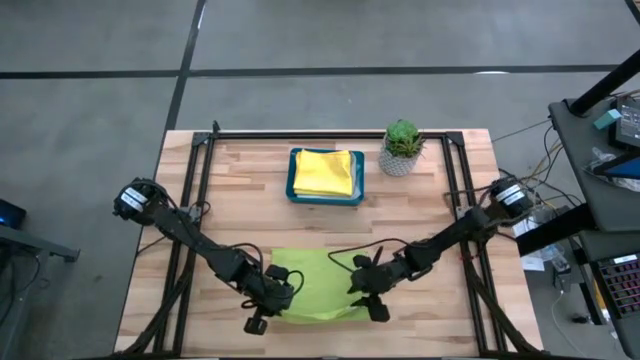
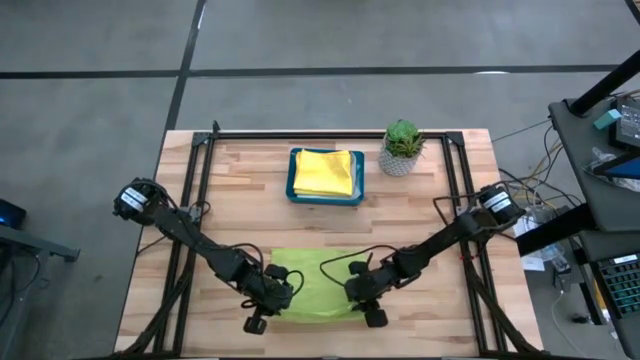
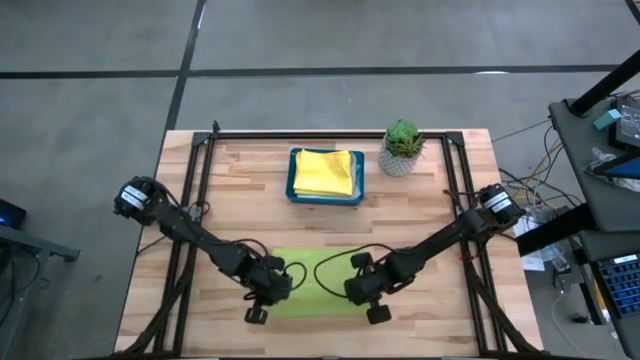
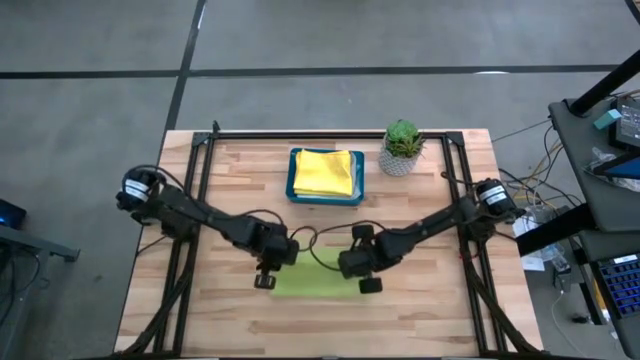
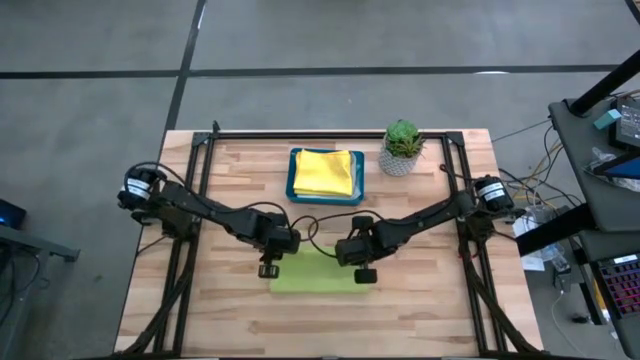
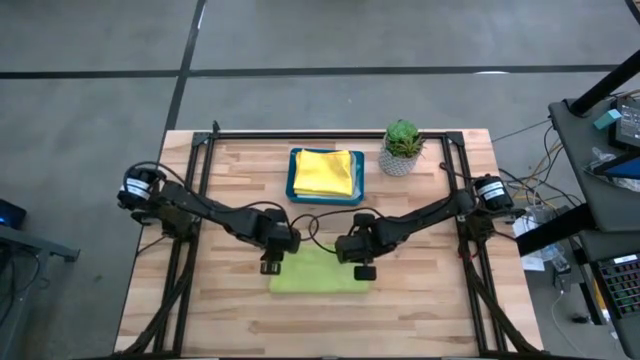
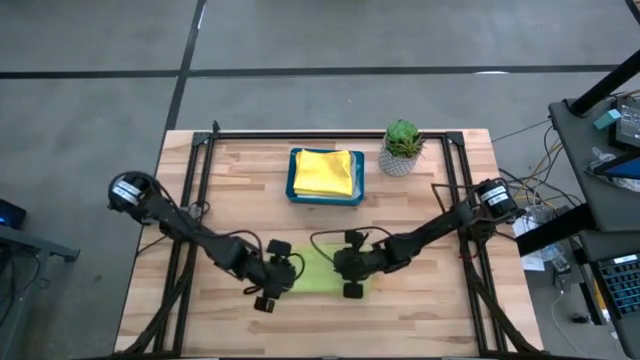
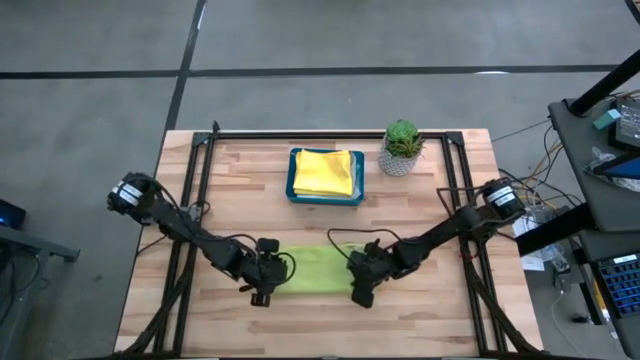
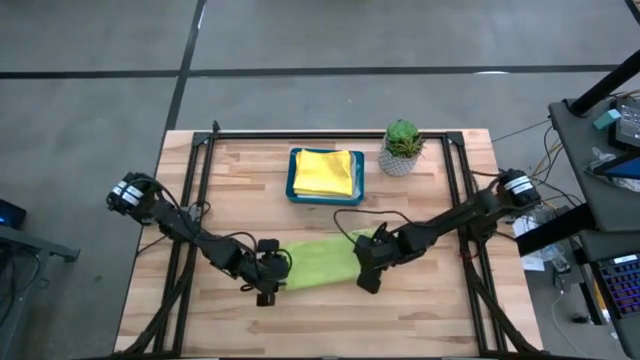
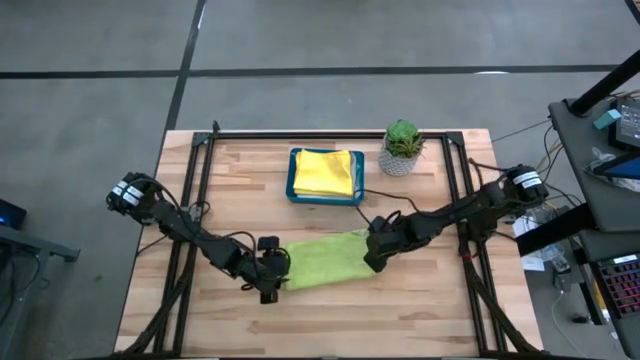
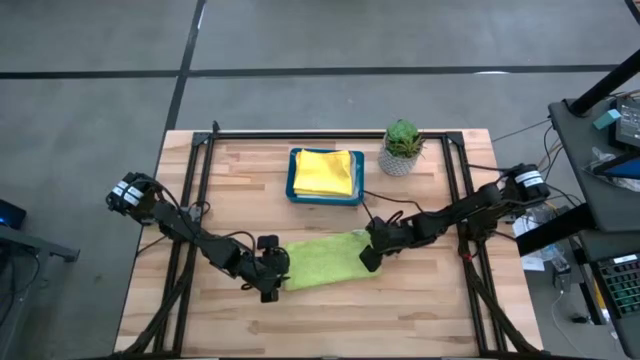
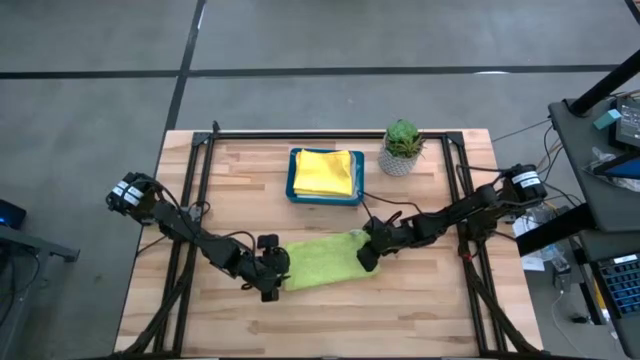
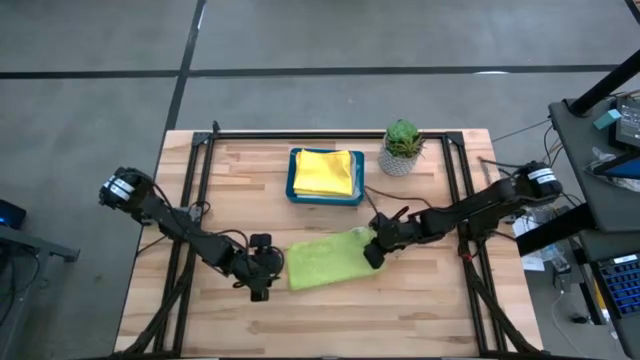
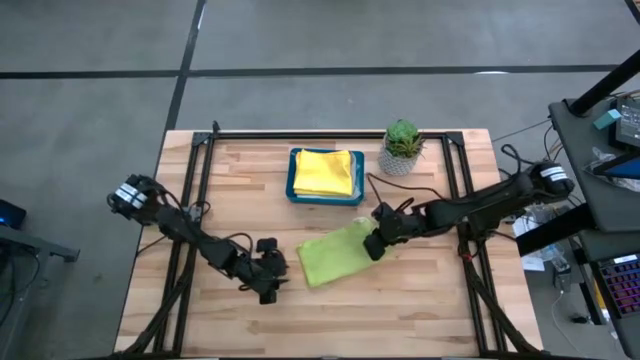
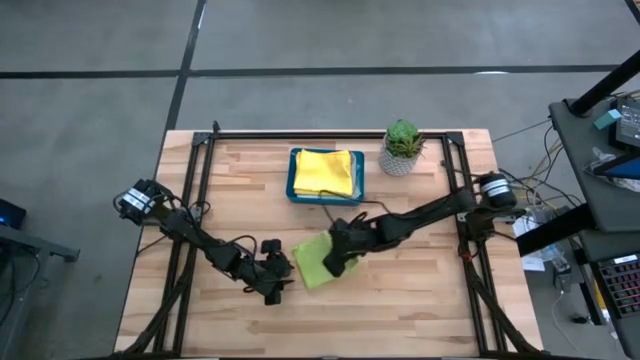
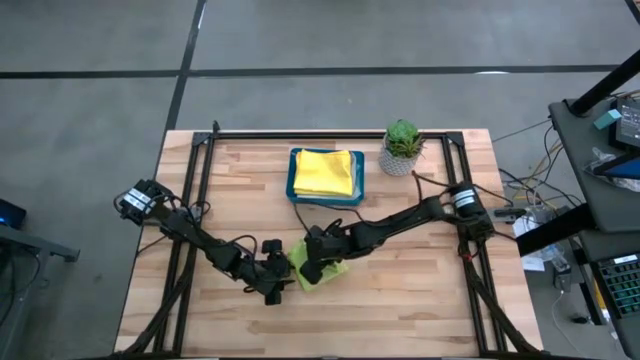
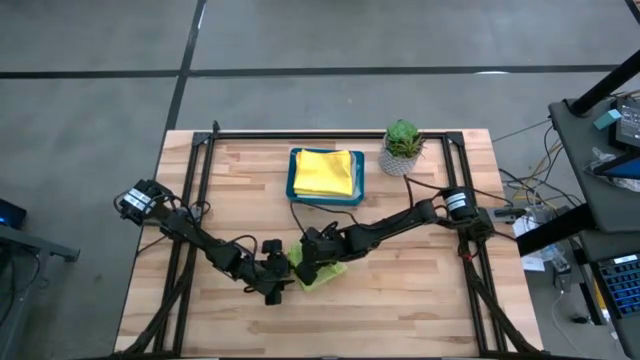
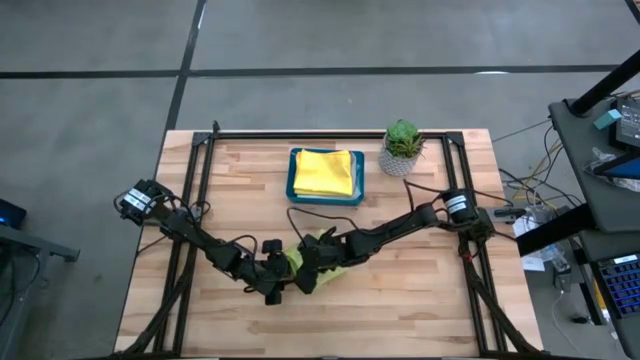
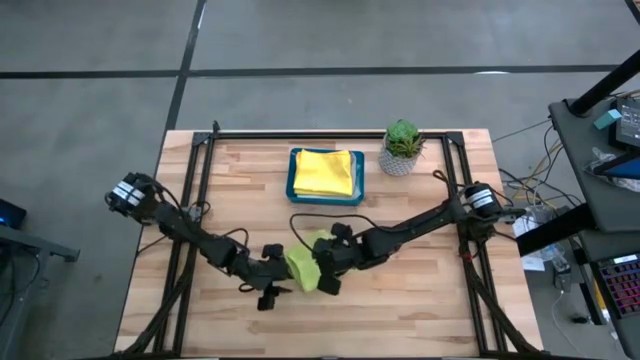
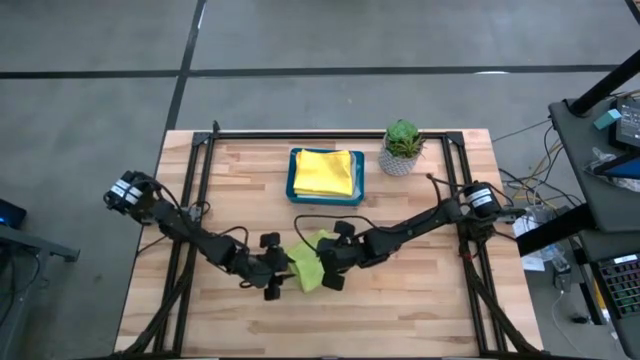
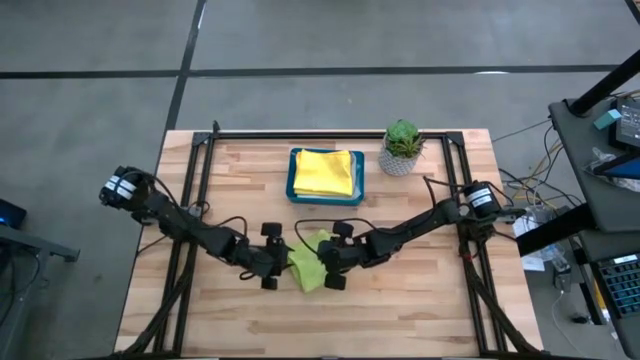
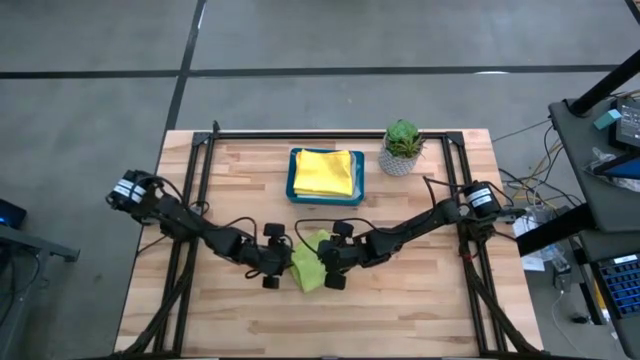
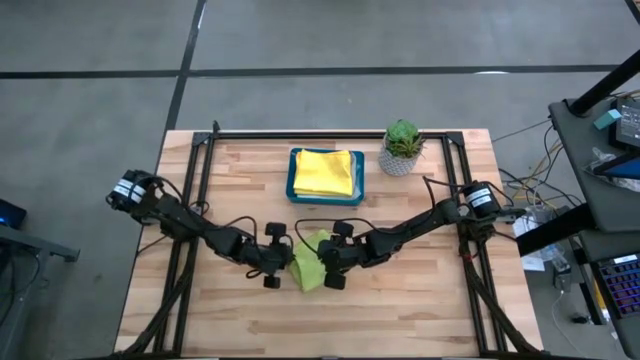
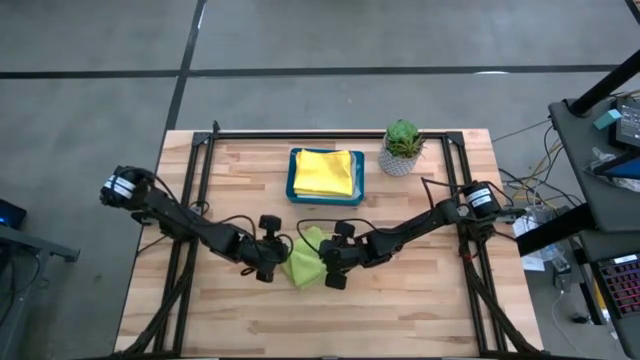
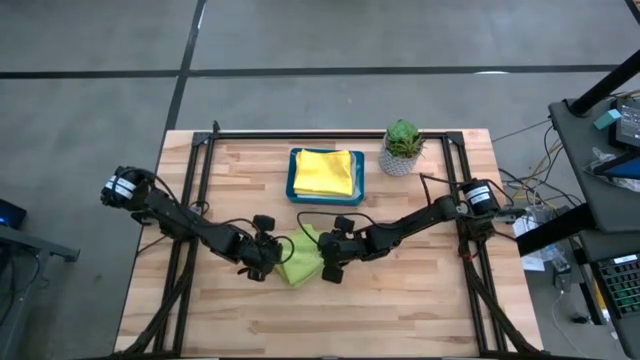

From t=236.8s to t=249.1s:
Task: Fold microfiber towels
Fold the green microfiber cloth

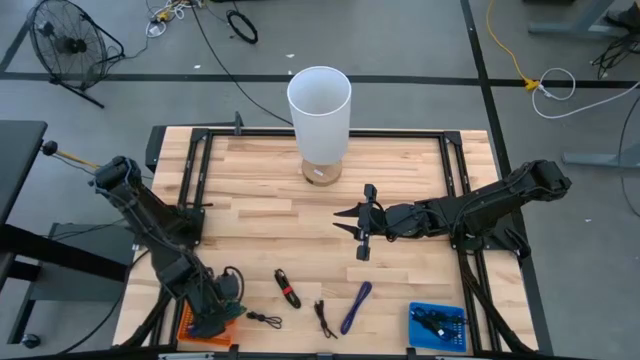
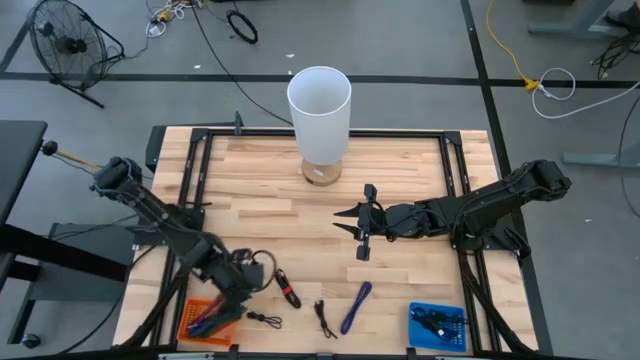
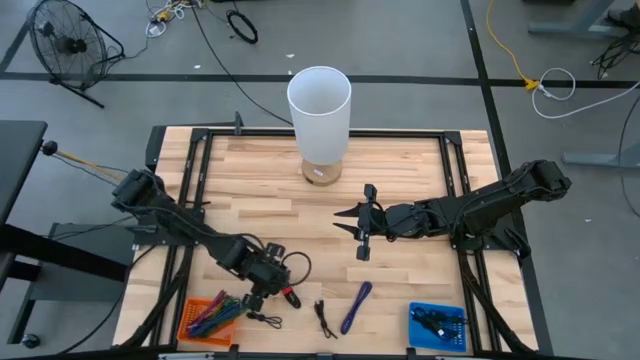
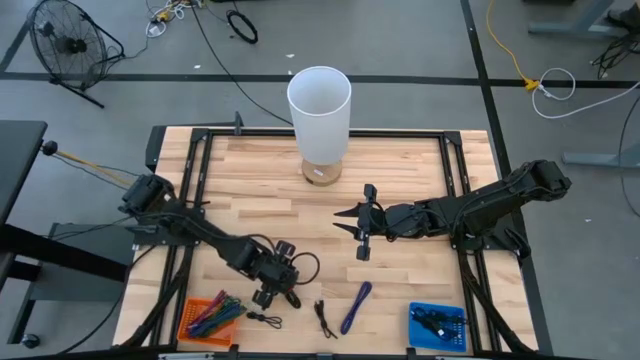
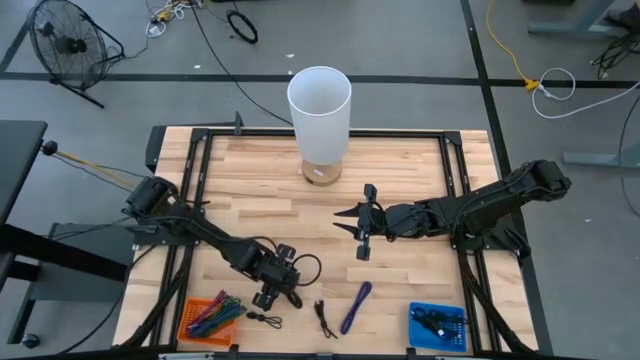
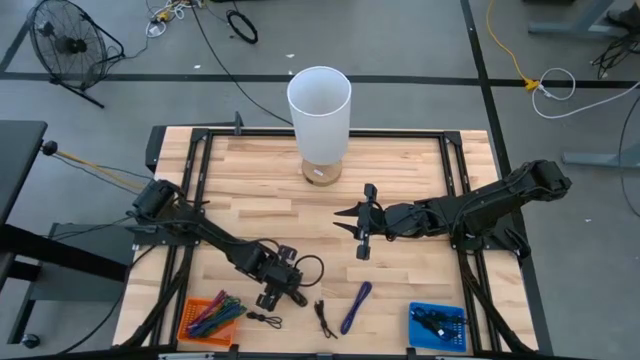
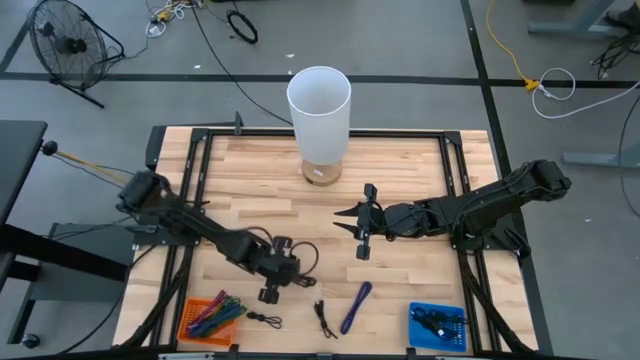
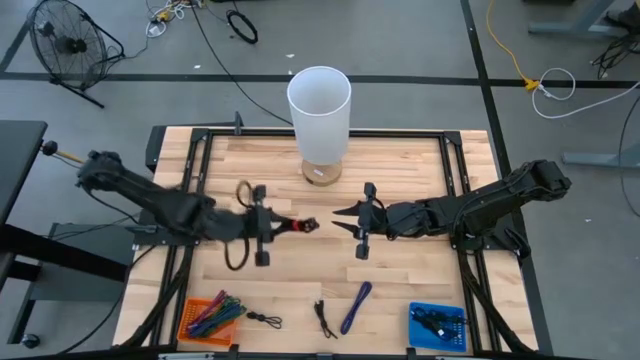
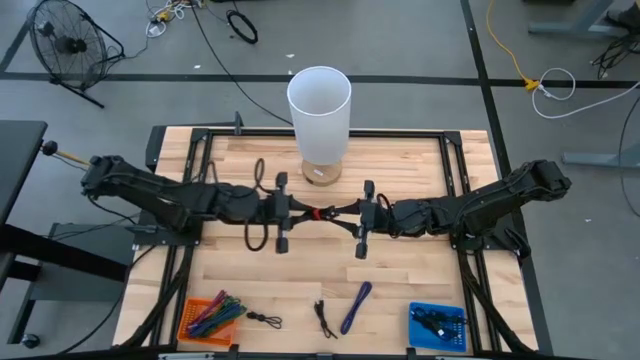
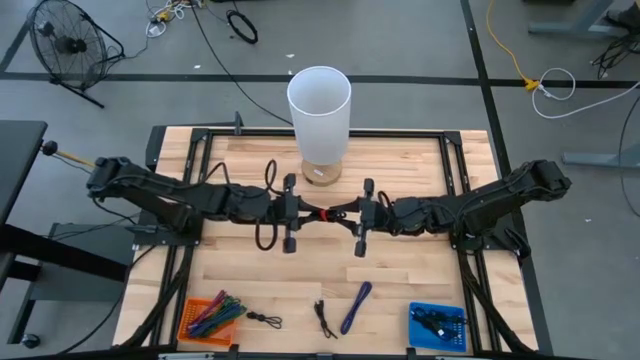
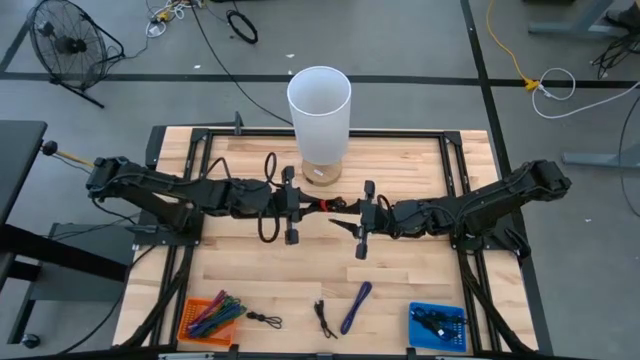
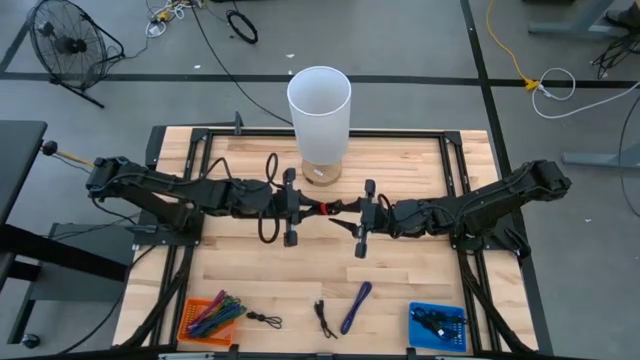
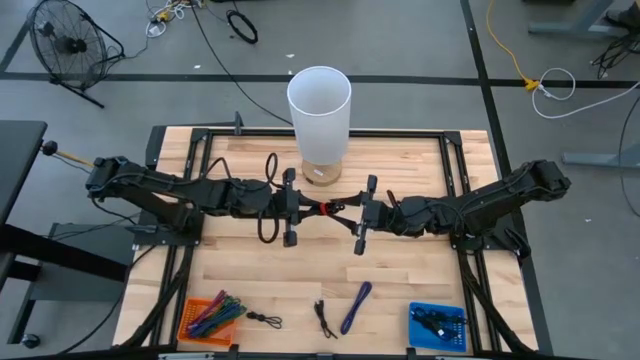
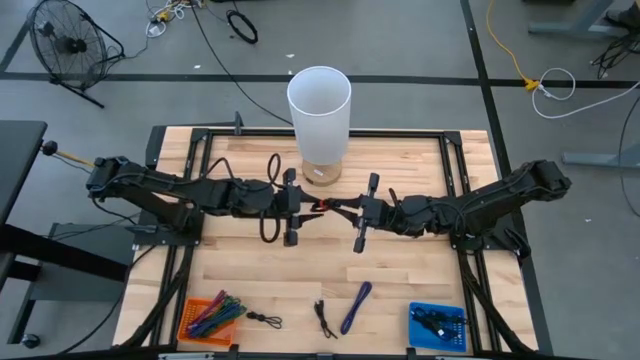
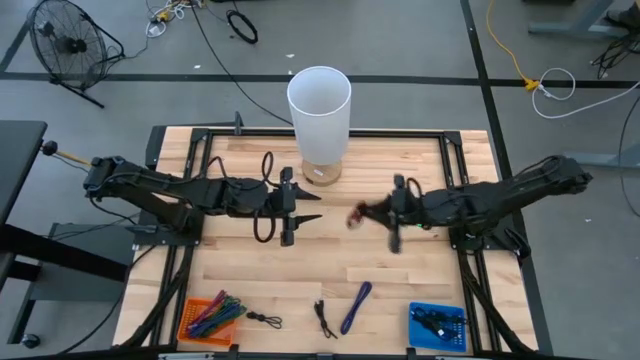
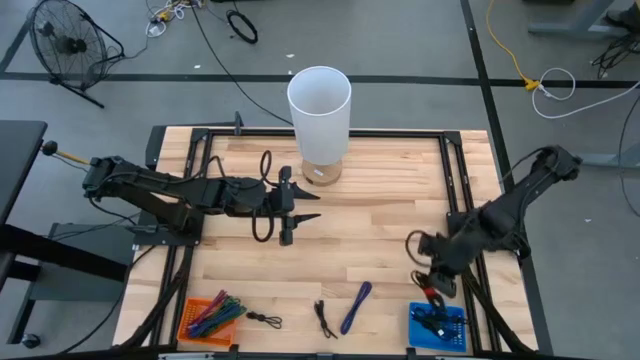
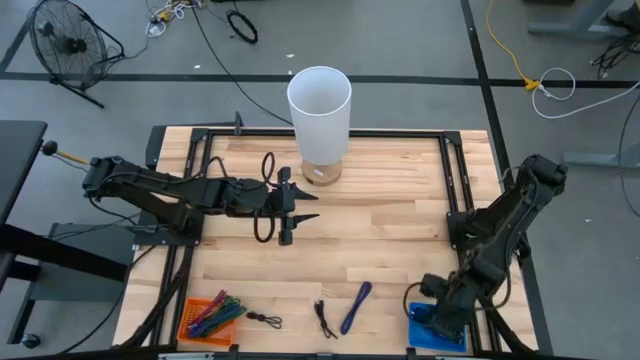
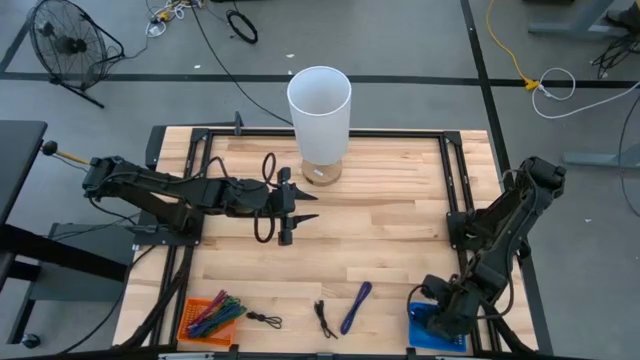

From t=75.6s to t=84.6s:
Task: Pick & Place USB Port
Put the black charger cable into the blue bin
